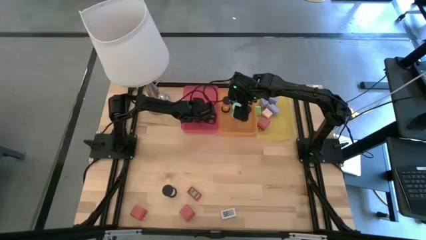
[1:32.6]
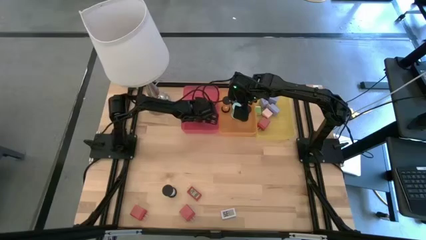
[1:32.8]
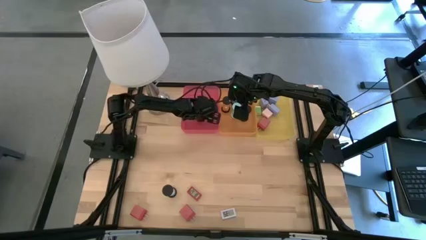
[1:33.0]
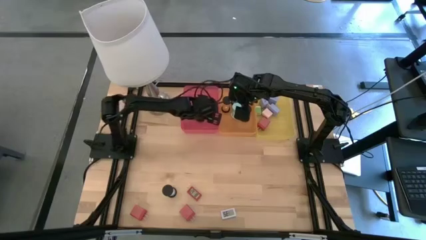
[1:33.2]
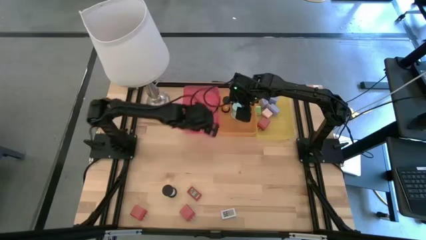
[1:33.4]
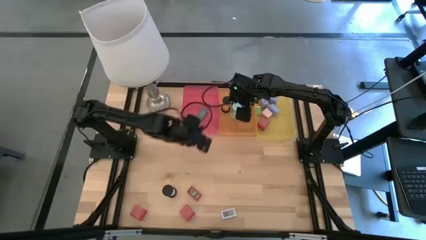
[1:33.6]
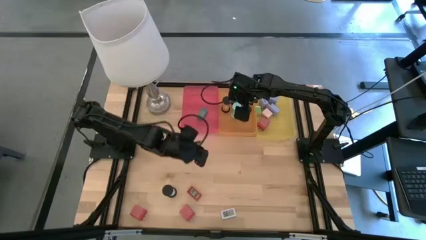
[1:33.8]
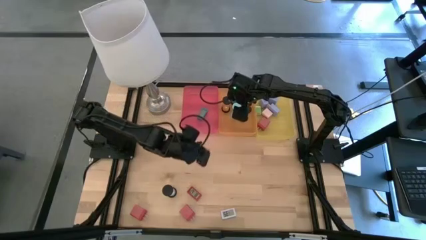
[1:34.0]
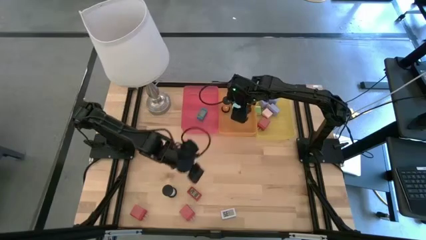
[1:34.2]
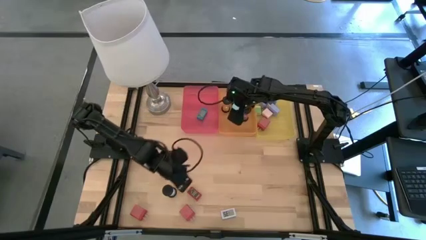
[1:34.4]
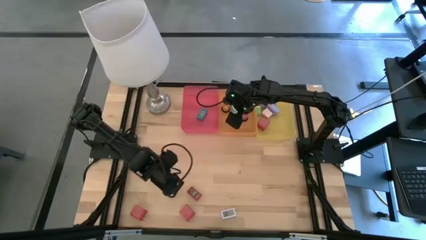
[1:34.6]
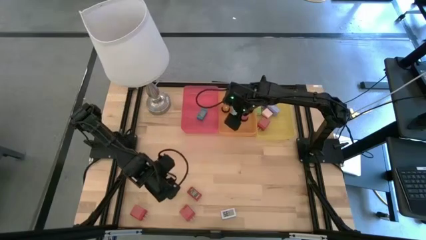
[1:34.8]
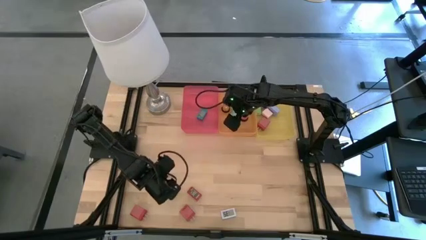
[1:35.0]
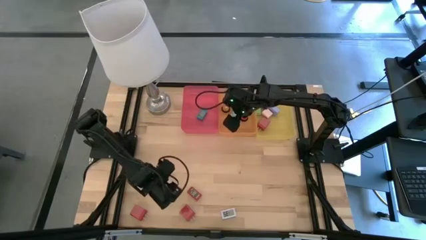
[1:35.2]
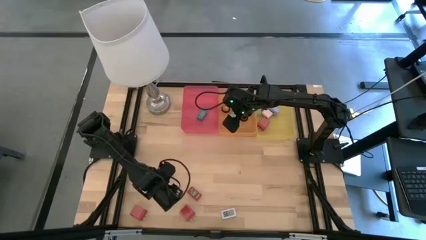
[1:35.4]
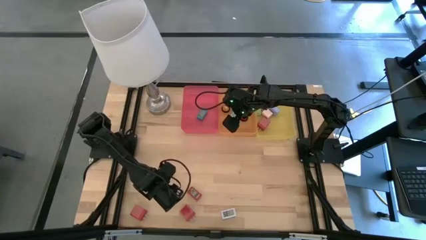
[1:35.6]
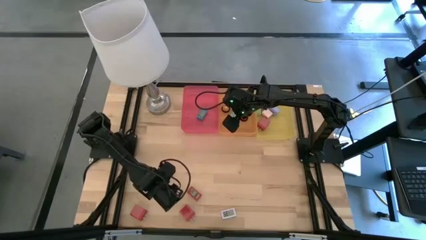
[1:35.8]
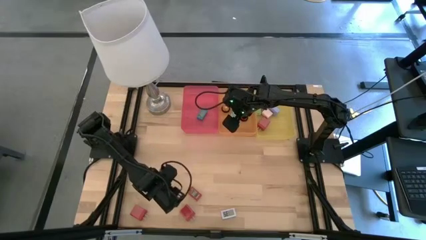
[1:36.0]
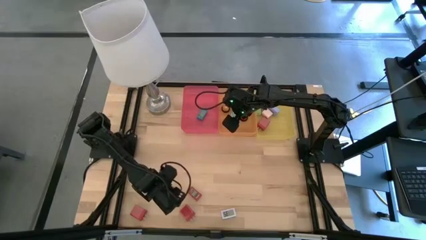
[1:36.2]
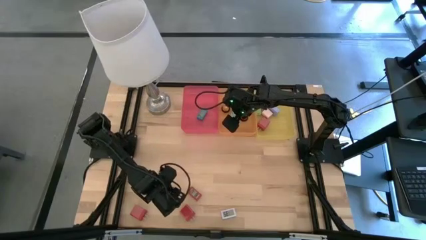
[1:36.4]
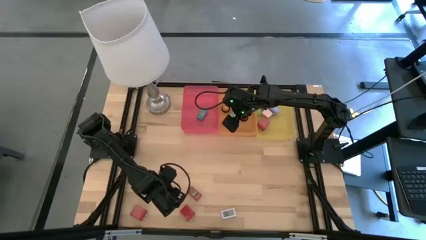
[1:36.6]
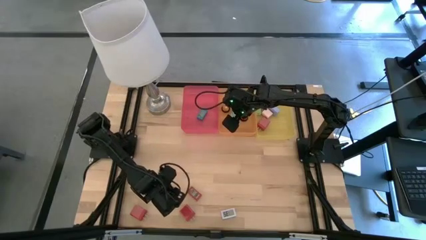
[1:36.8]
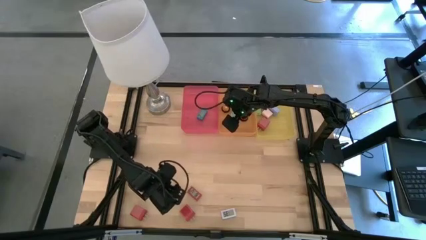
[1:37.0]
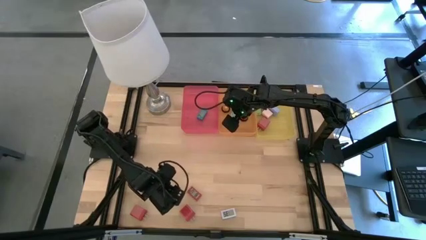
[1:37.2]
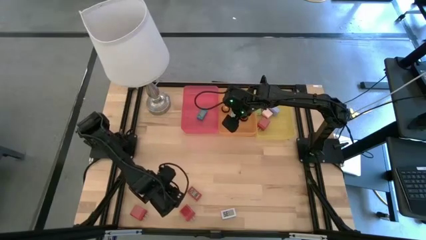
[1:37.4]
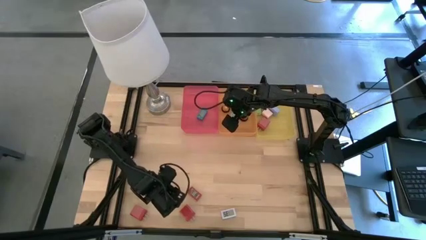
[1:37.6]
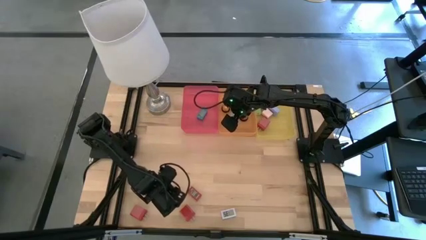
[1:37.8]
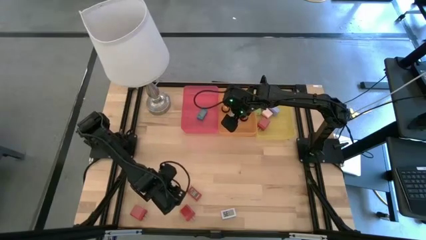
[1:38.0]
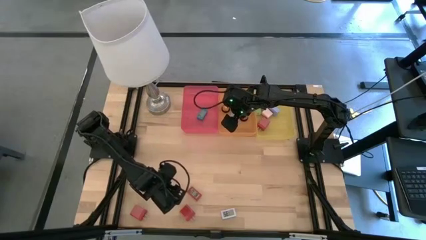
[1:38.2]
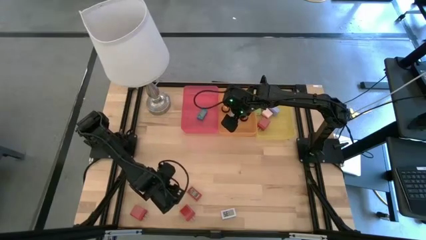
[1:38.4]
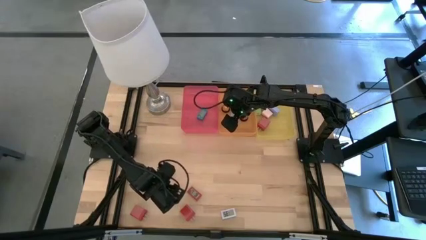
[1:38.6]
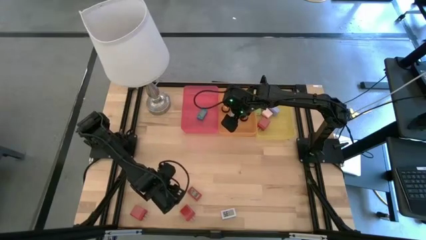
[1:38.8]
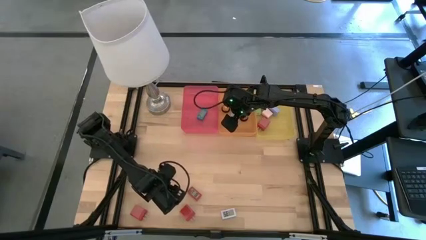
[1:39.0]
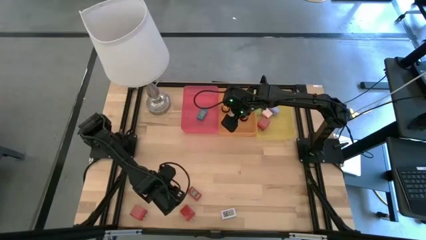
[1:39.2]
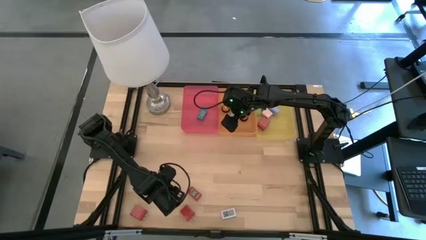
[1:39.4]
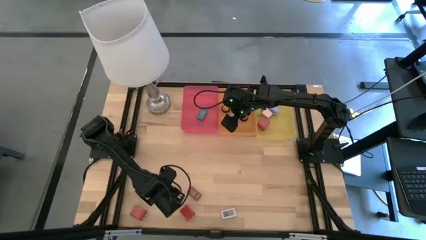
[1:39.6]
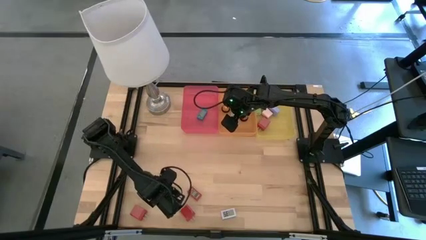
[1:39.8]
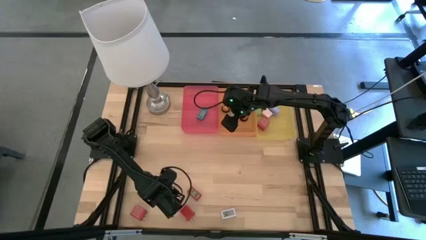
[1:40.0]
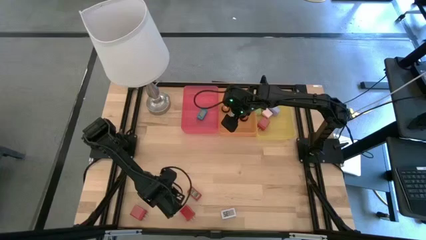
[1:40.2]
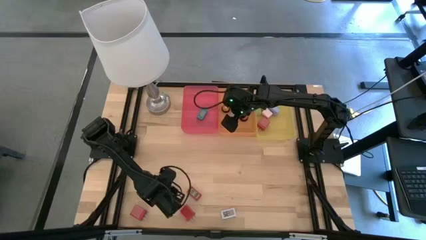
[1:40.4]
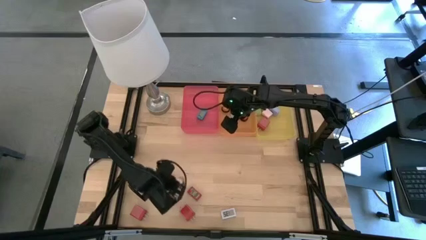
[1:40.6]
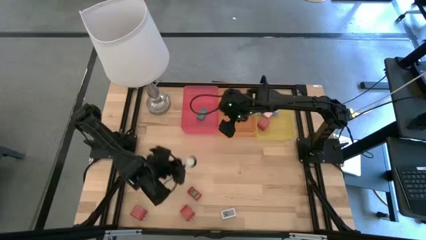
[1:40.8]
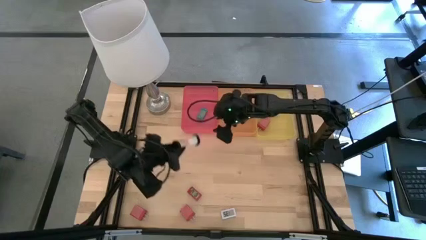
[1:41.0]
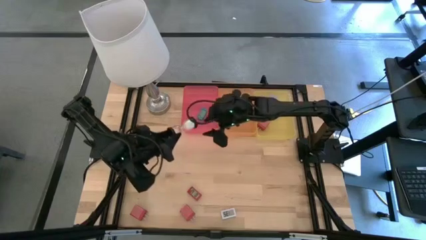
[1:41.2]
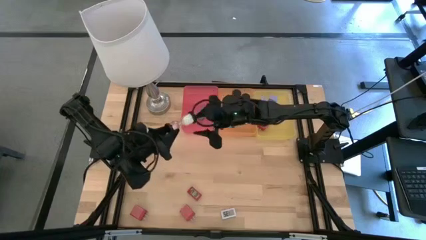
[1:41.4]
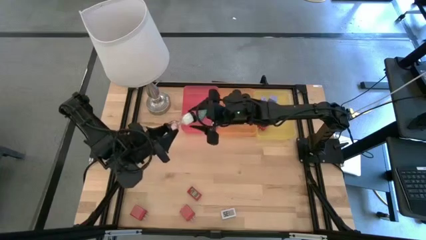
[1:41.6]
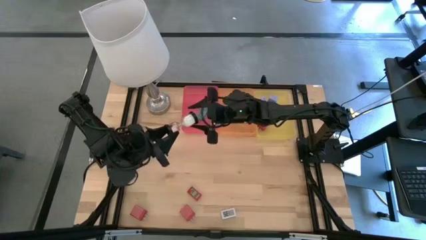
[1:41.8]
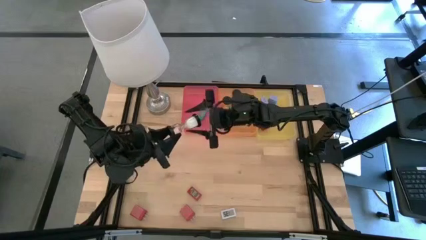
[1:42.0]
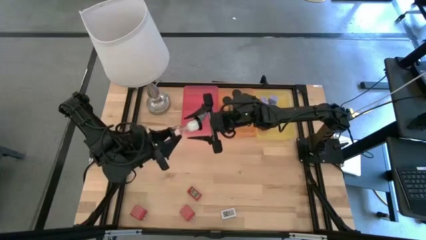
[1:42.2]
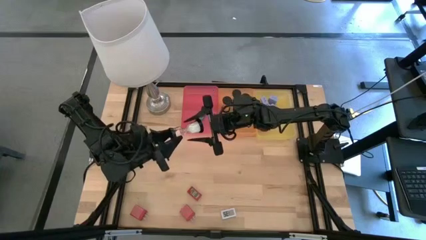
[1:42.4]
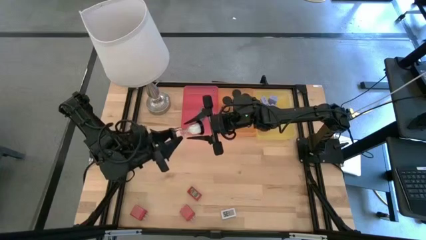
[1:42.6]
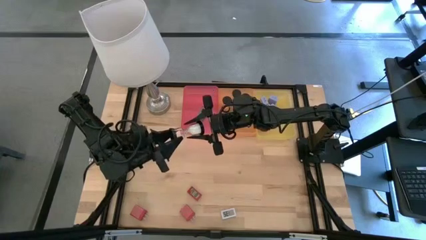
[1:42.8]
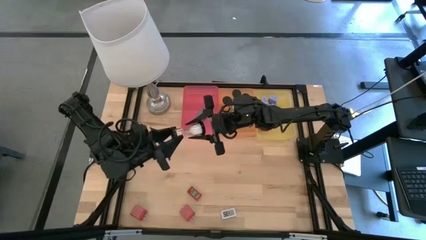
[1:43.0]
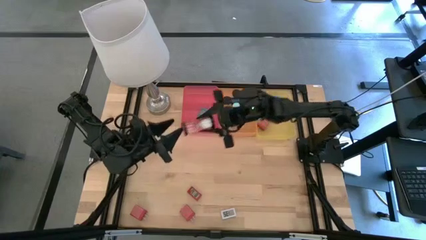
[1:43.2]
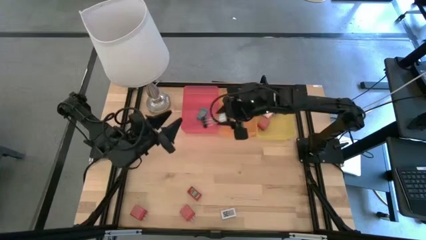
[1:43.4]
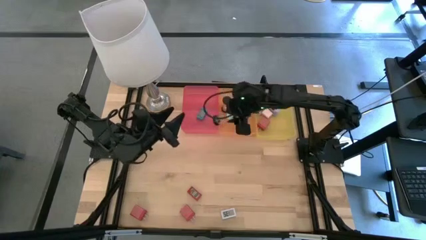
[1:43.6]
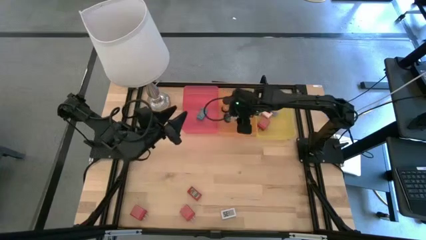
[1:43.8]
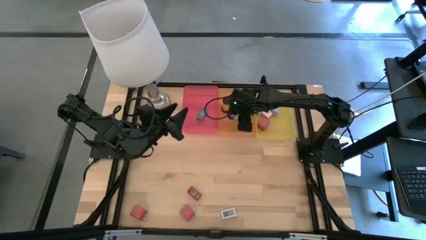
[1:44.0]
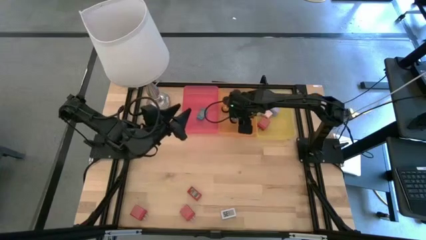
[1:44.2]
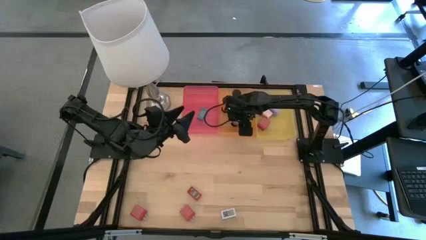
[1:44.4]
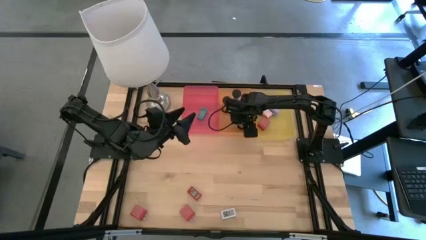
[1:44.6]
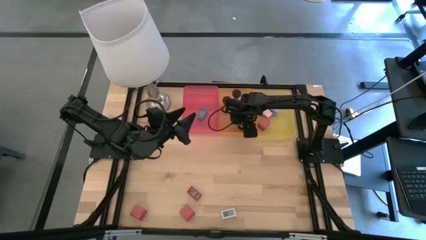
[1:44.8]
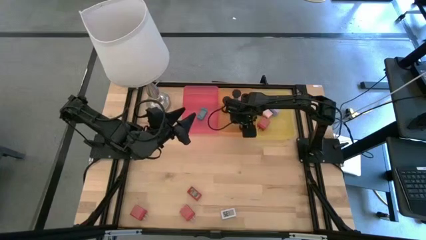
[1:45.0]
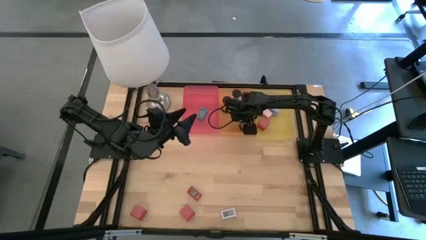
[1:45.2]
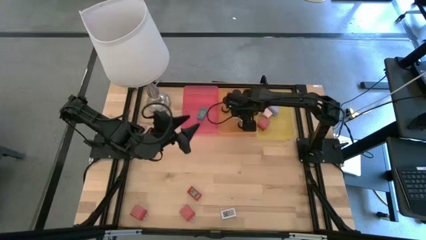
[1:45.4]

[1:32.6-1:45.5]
Task: Pick & Place Office items
Put the white hourglass into the orange bin
